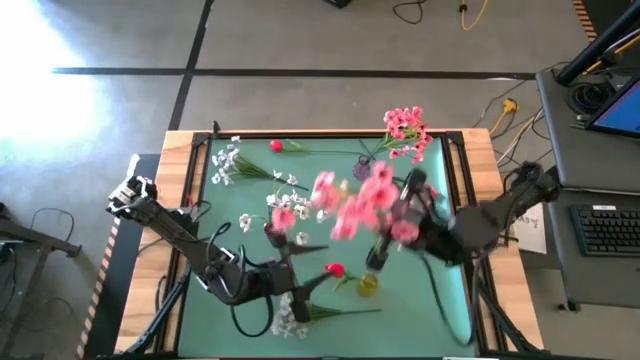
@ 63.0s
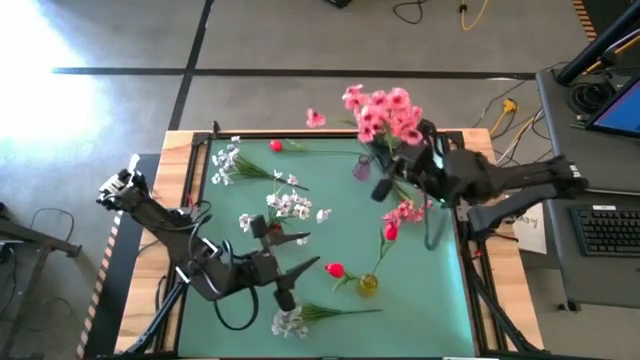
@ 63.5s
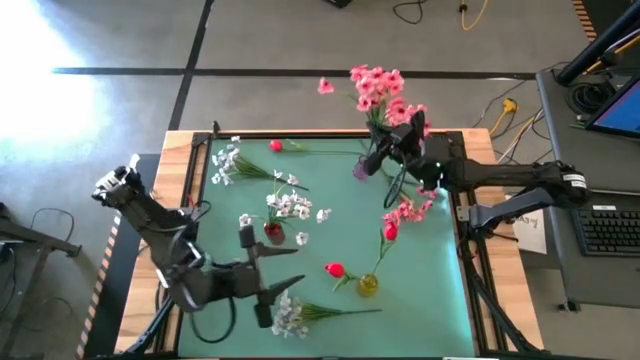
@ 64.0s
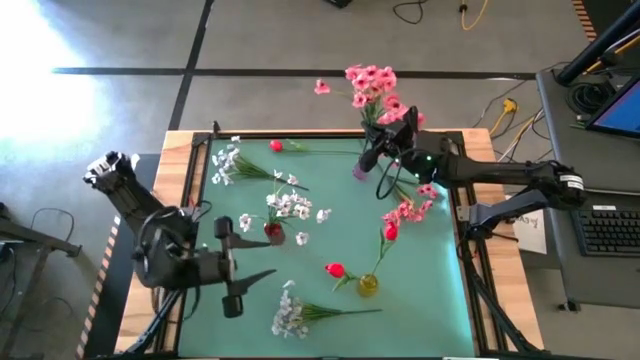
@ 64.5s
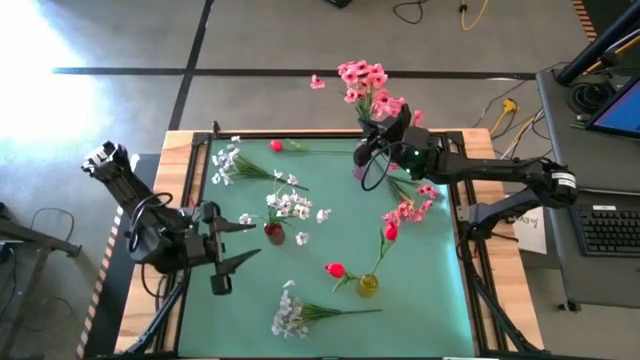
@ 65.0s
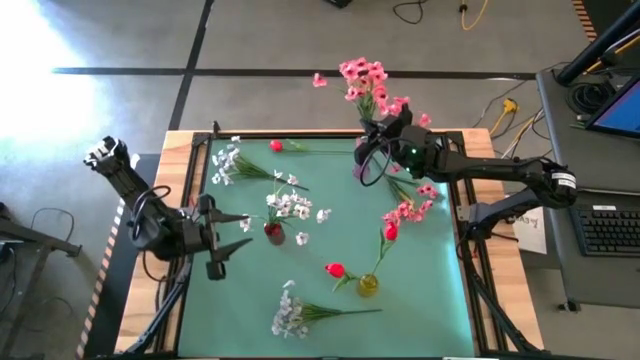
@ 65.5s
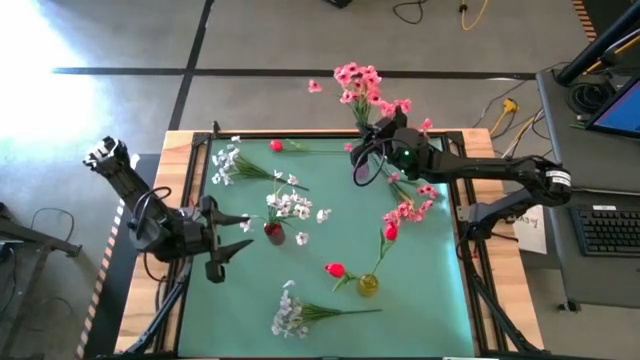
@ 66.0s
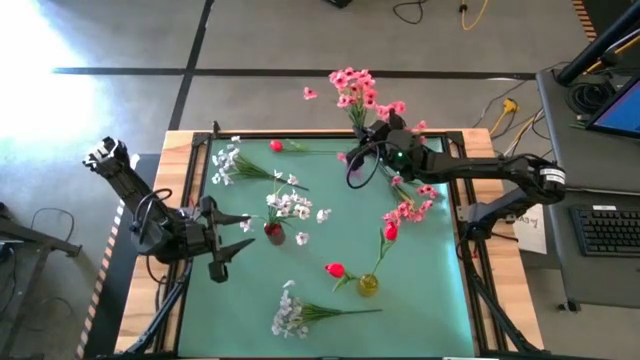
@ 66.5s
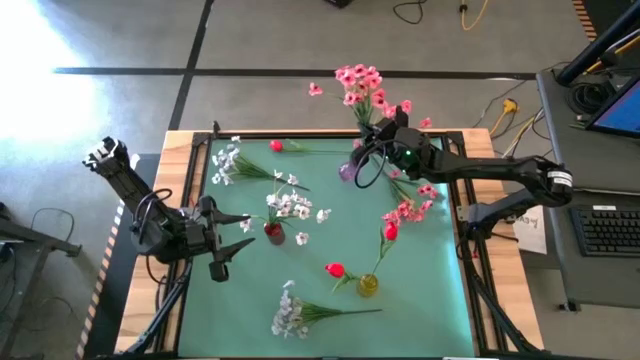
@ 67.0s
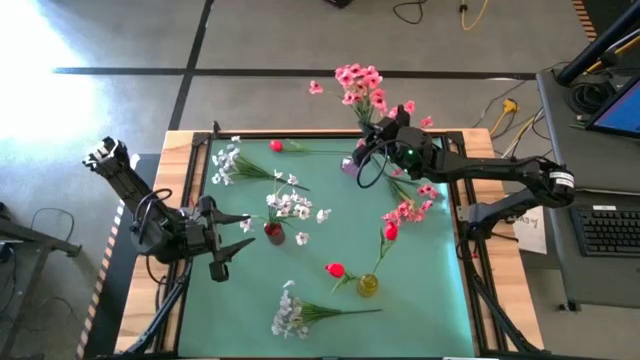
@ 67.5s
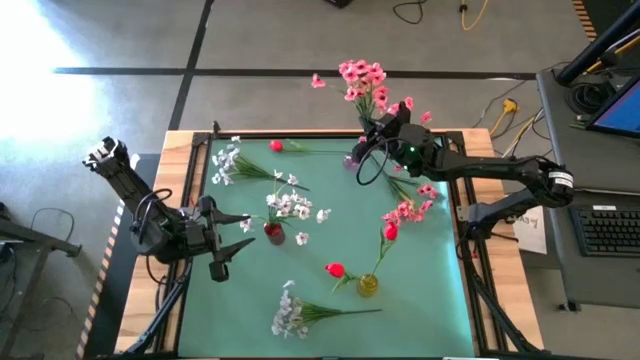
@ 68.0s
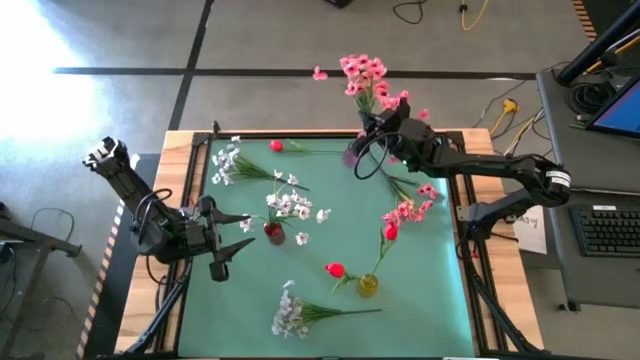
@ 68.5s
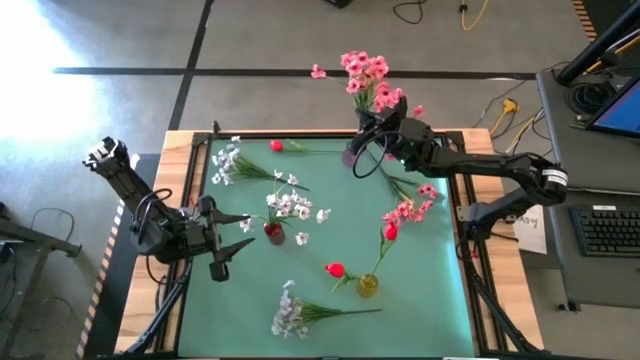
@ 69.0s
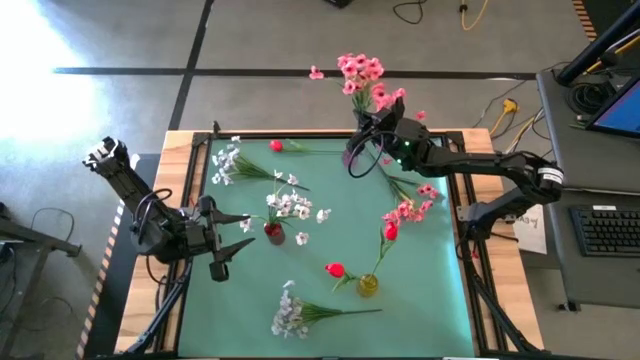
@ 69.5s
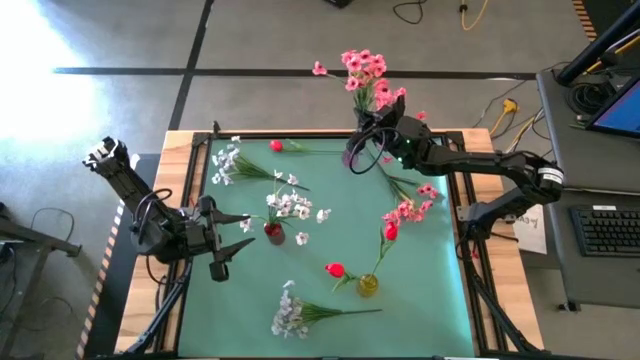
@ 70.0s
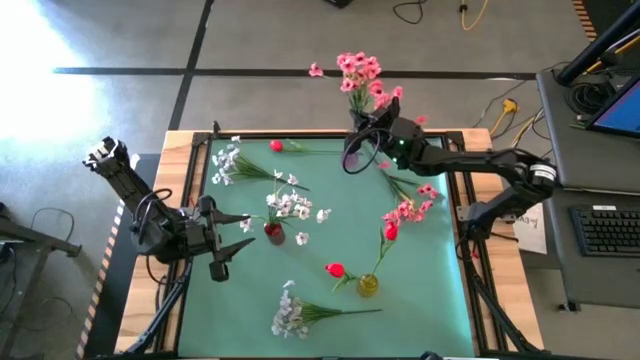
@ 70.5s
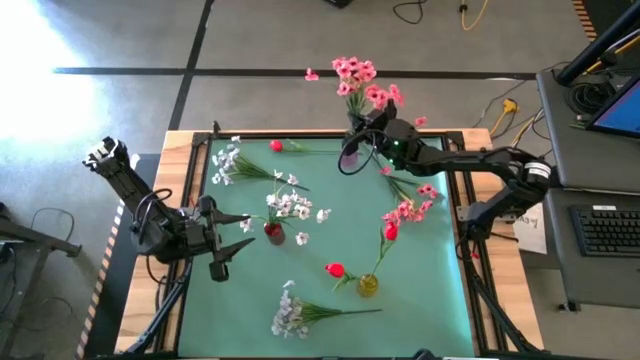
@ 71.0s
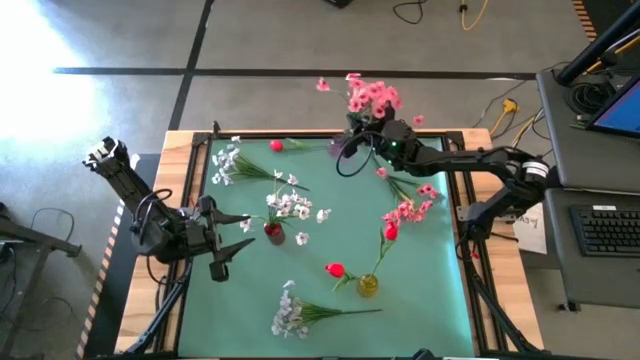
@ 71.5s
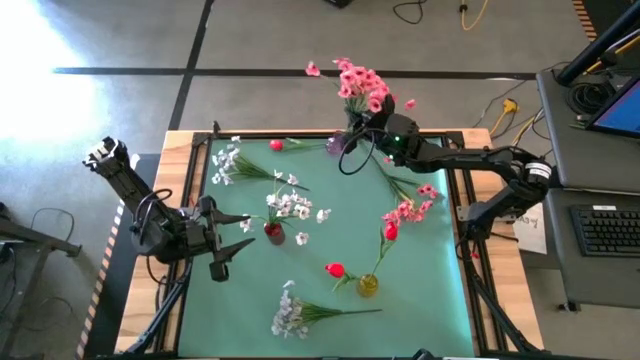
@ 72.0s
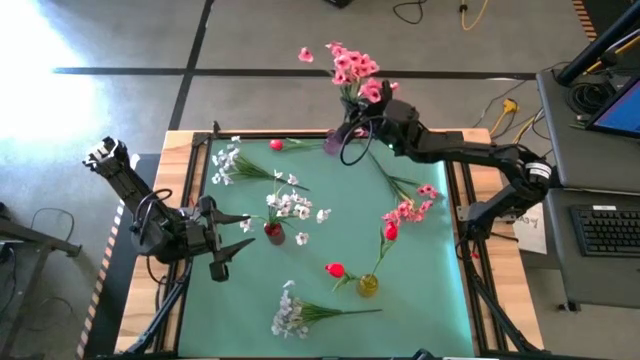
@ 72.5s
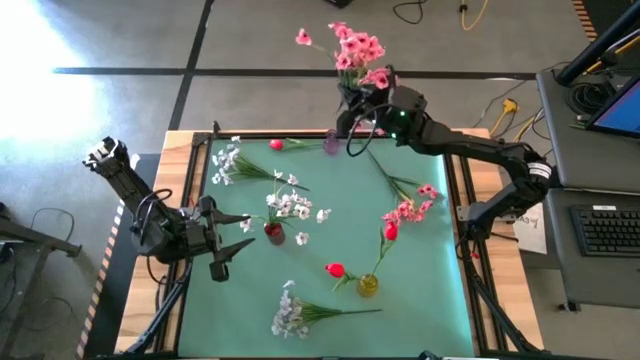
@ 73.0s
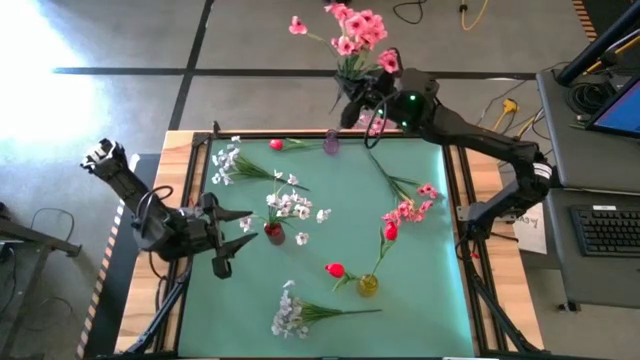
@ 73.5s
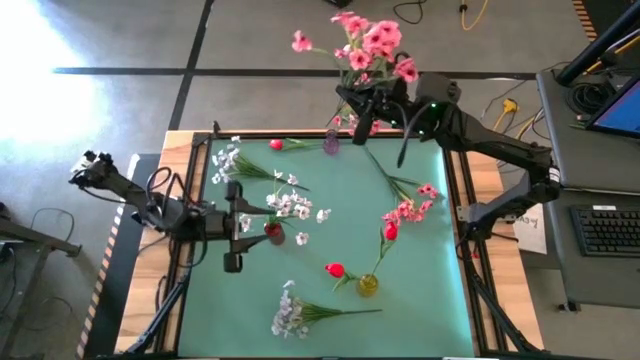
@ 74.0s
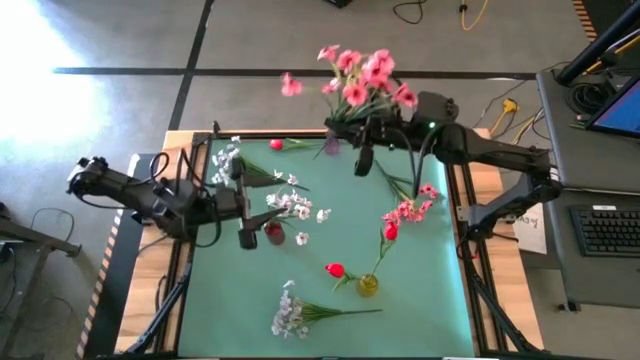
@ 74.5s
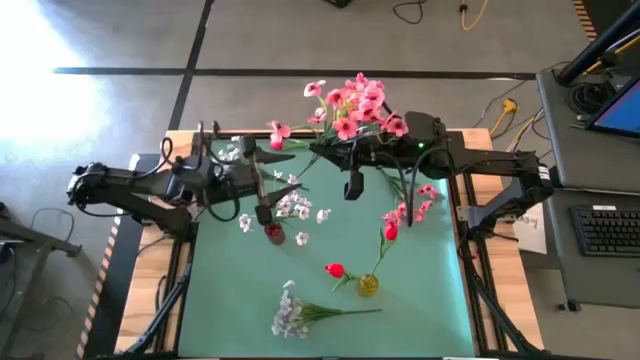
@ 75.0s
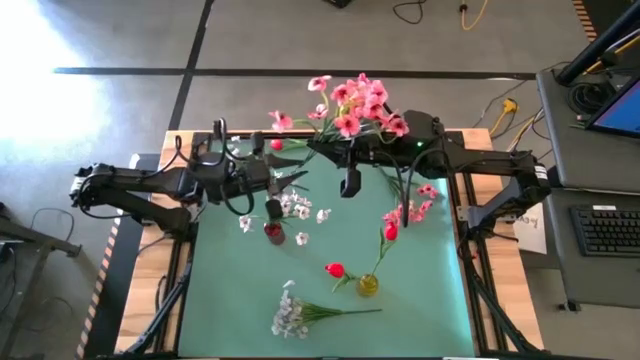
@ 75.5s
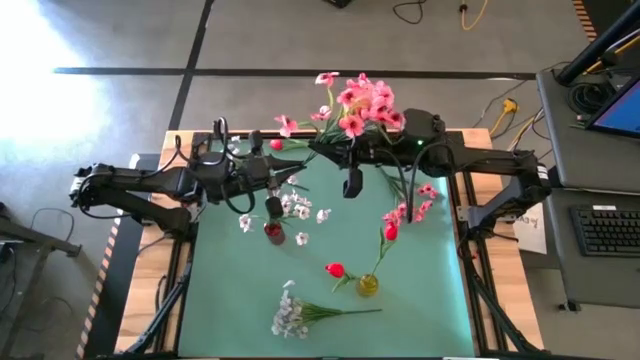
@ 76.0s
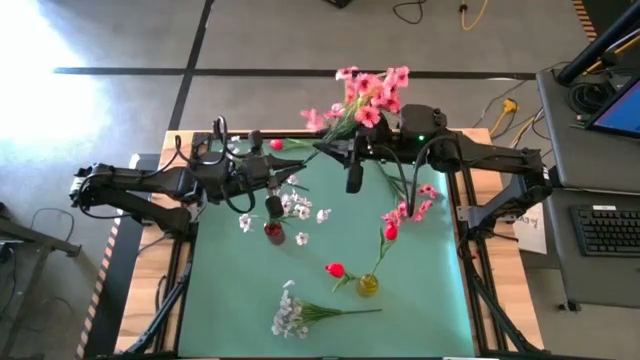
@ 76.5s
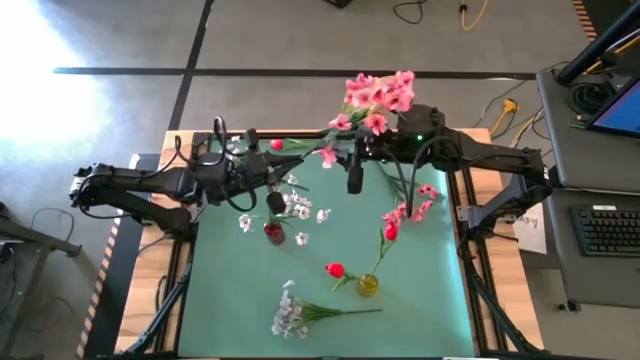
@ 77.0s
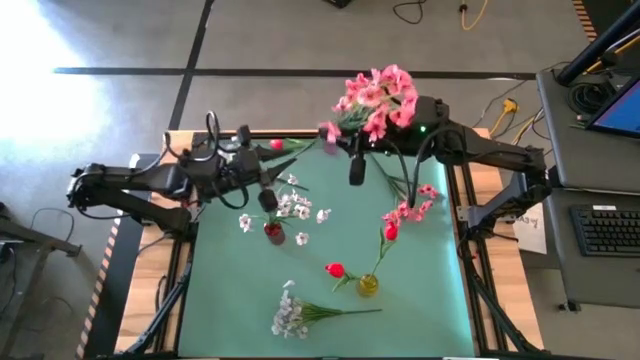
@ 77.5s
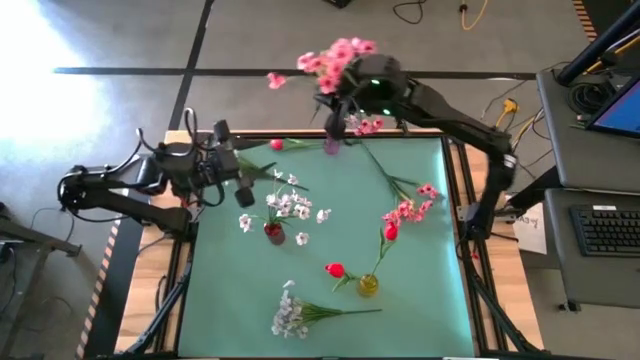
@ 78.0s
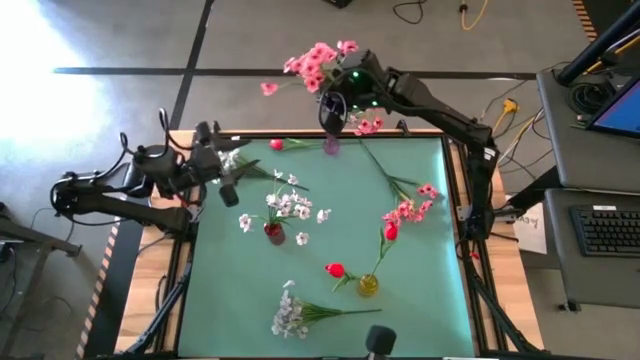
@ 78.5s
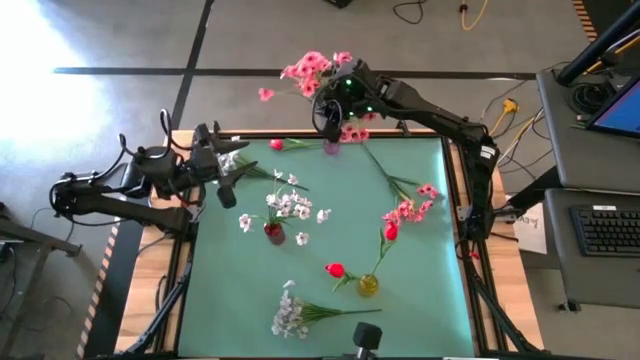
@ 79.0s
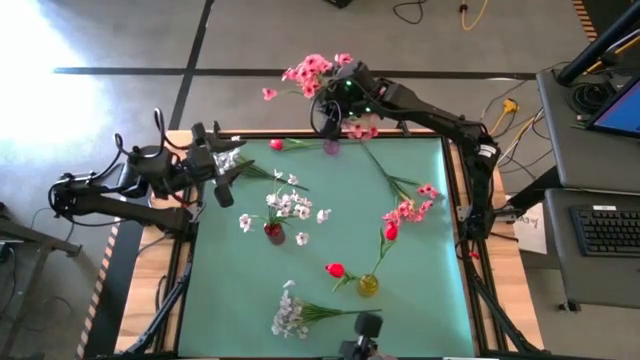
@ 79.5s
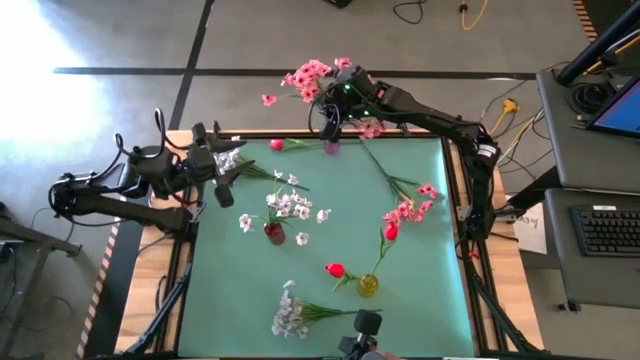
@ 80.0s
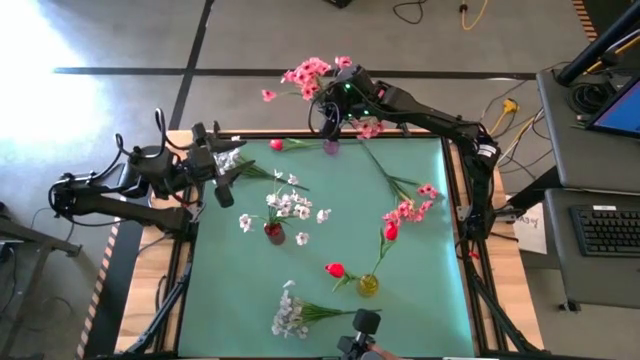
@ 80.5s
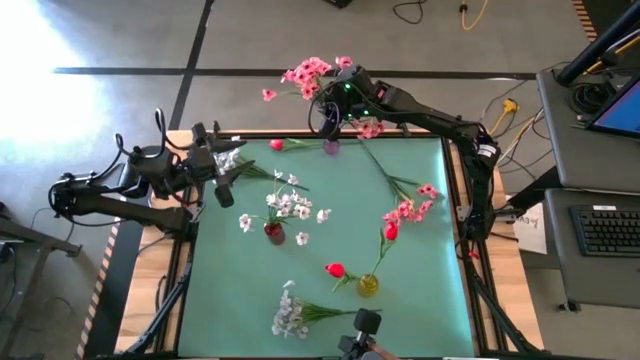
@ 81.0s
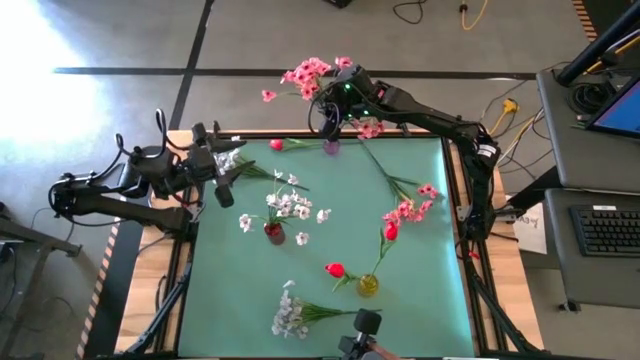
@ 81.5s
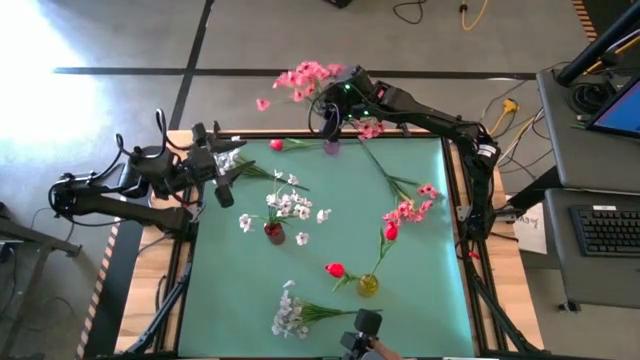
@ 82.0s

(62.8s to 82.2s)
Task: Sort flowers into vase by color
Put the left pink flower into the purple flower vase
